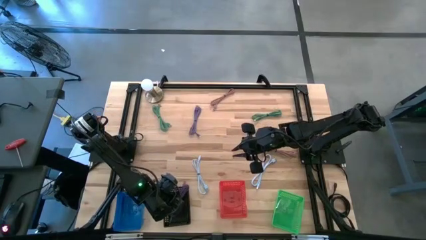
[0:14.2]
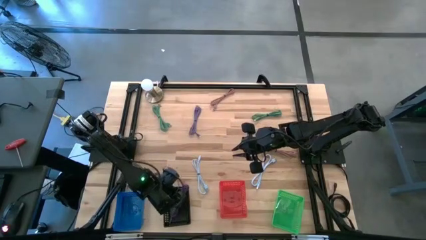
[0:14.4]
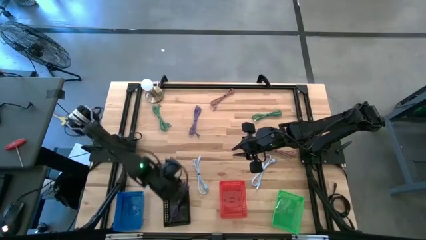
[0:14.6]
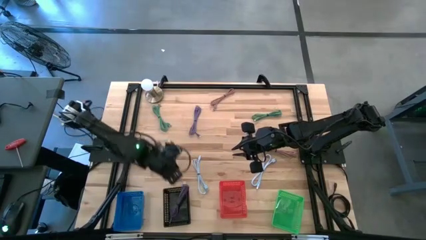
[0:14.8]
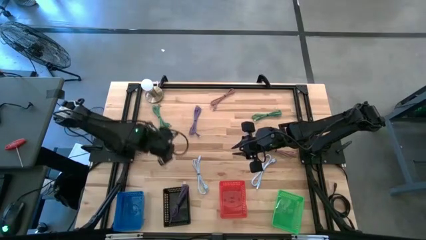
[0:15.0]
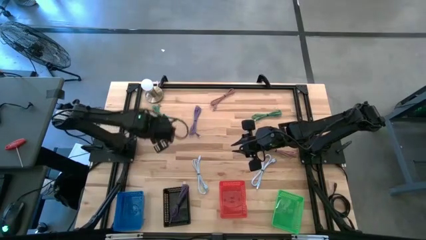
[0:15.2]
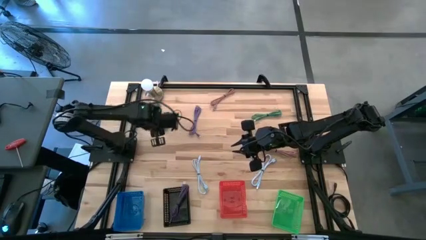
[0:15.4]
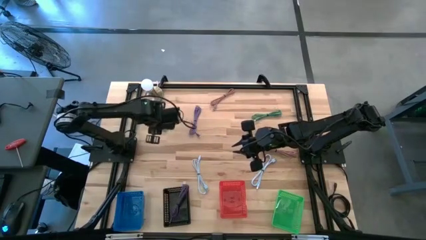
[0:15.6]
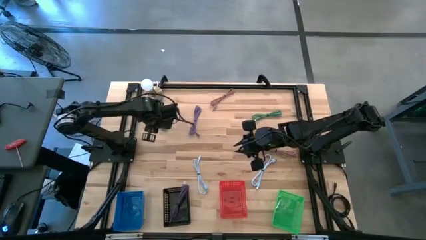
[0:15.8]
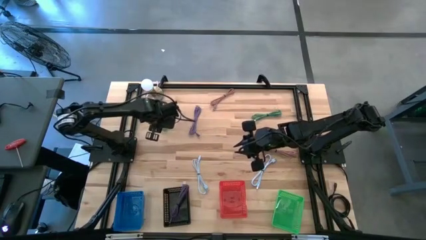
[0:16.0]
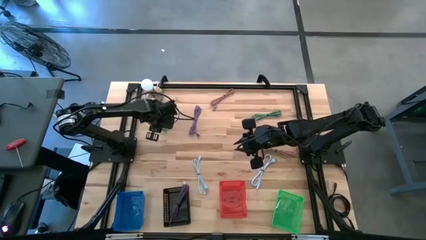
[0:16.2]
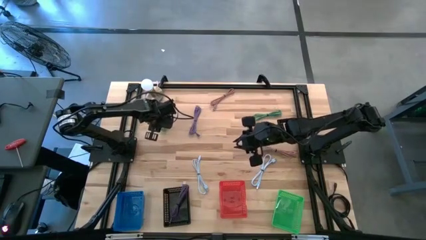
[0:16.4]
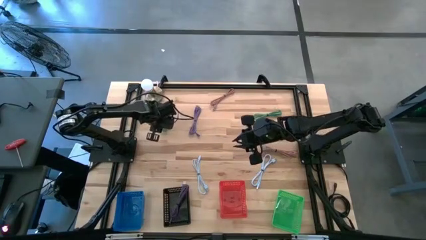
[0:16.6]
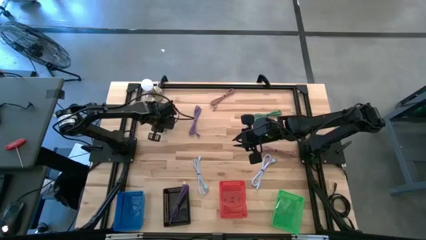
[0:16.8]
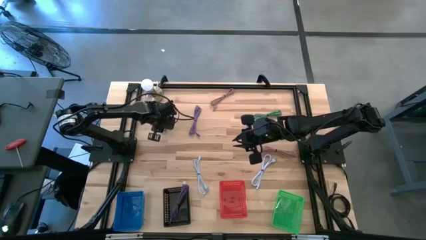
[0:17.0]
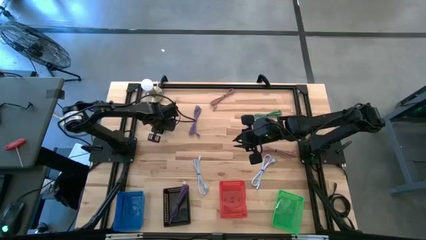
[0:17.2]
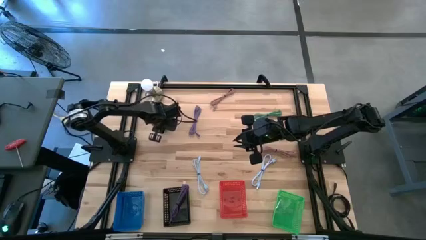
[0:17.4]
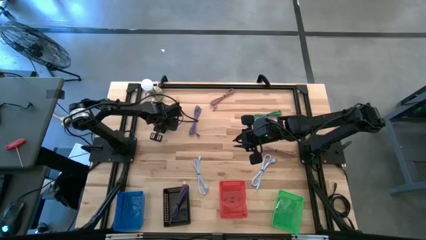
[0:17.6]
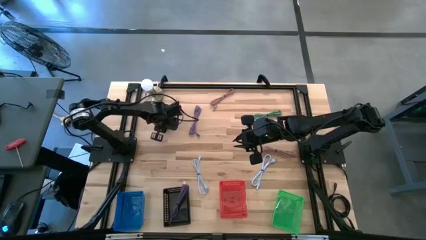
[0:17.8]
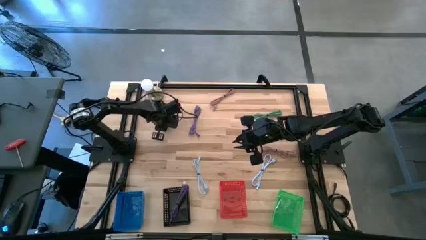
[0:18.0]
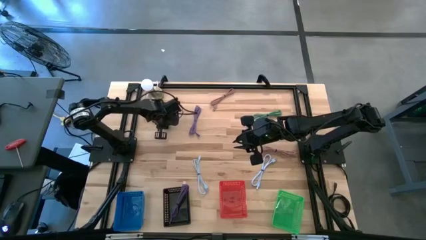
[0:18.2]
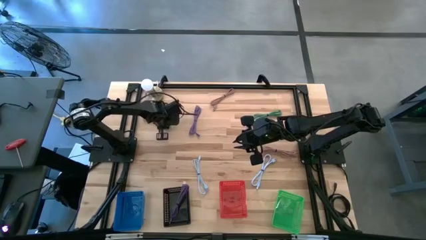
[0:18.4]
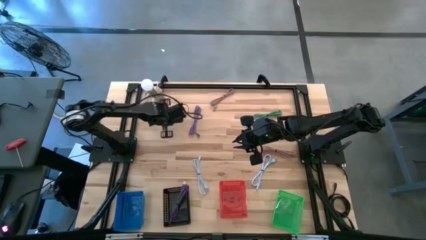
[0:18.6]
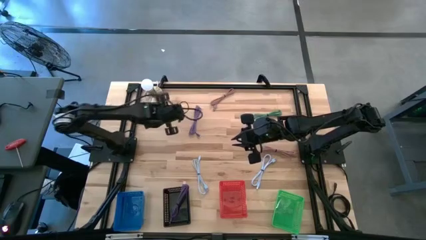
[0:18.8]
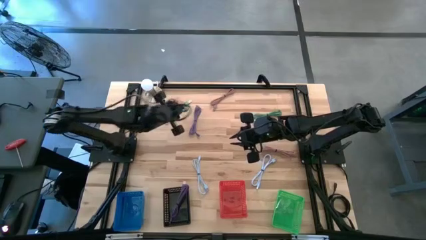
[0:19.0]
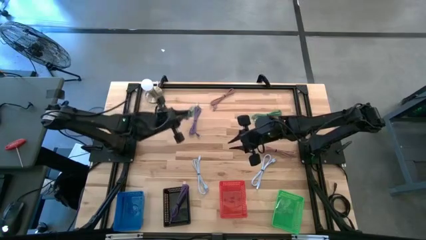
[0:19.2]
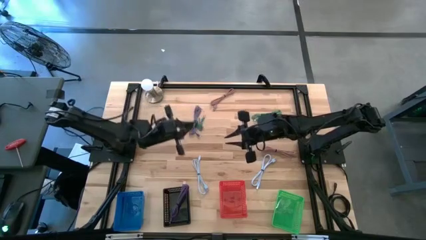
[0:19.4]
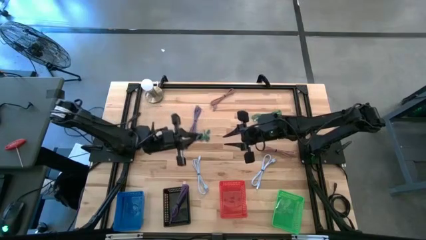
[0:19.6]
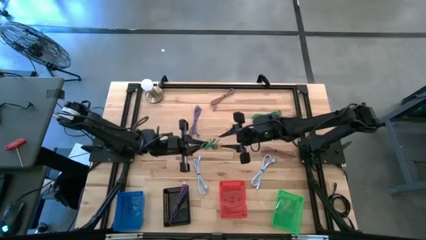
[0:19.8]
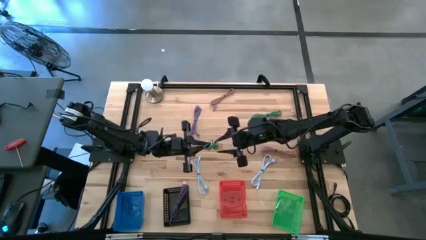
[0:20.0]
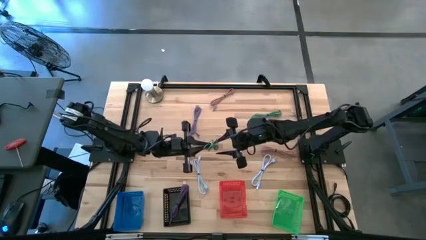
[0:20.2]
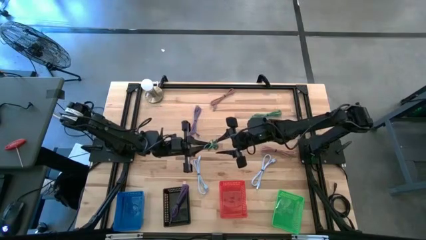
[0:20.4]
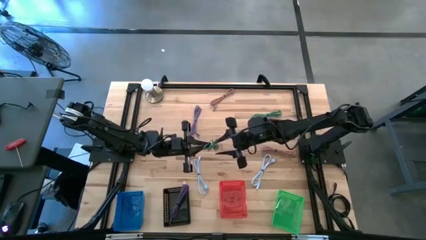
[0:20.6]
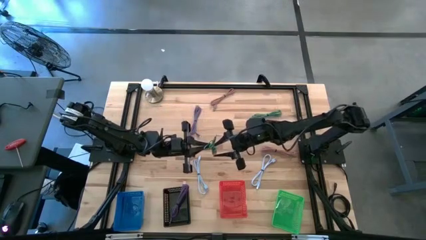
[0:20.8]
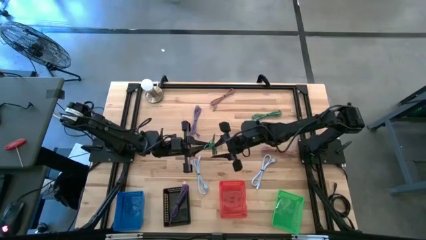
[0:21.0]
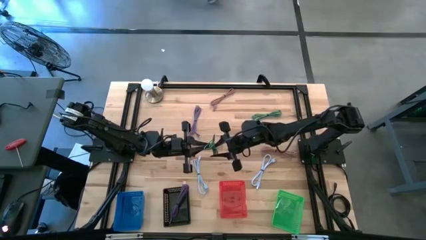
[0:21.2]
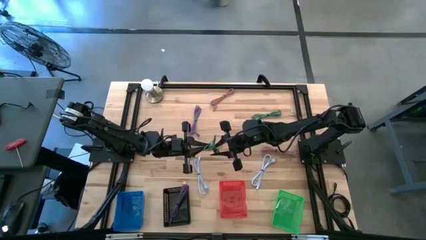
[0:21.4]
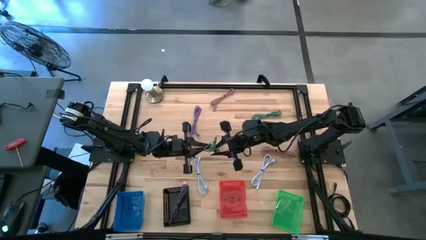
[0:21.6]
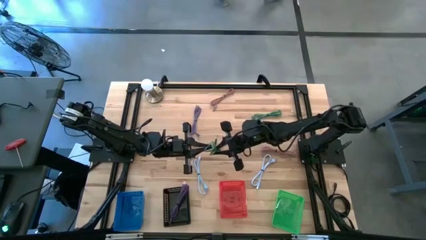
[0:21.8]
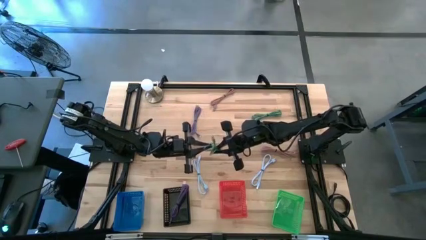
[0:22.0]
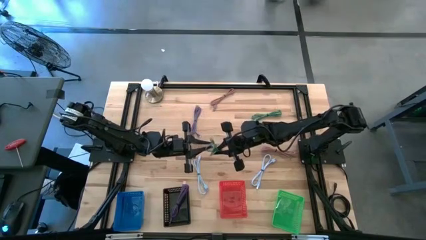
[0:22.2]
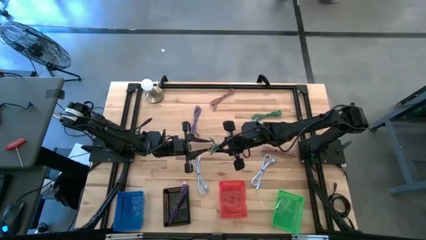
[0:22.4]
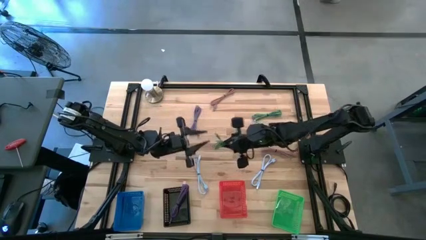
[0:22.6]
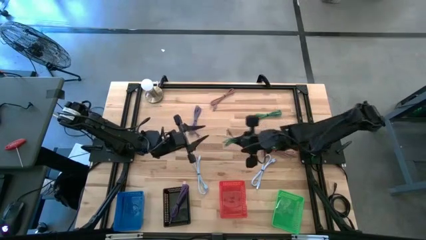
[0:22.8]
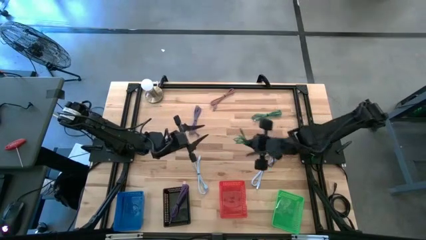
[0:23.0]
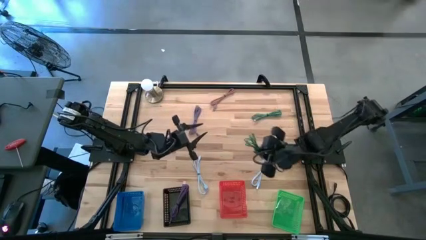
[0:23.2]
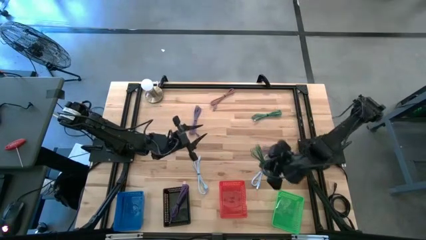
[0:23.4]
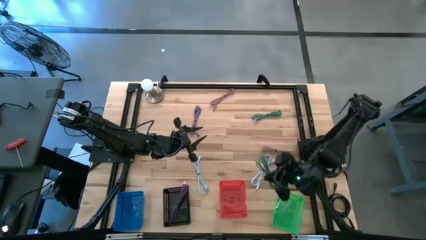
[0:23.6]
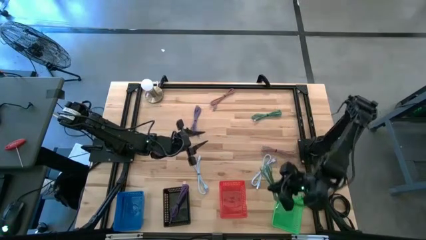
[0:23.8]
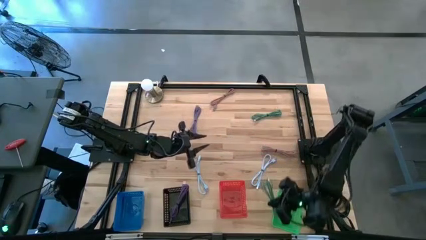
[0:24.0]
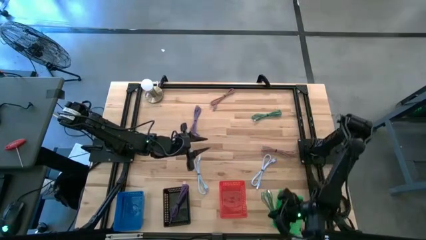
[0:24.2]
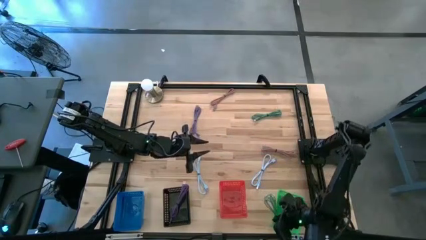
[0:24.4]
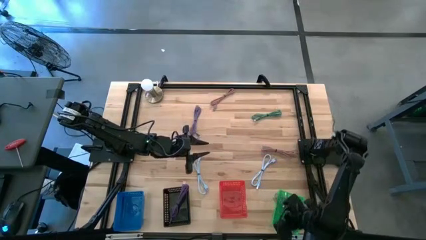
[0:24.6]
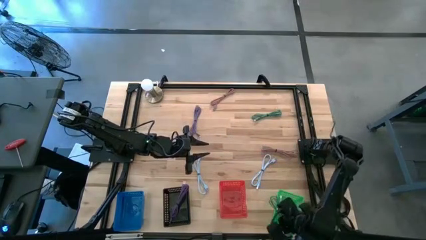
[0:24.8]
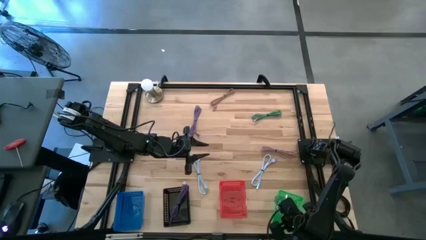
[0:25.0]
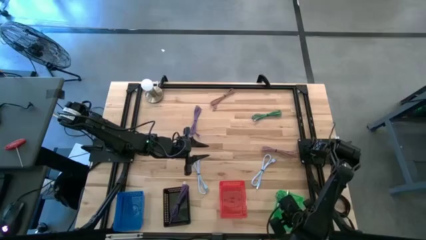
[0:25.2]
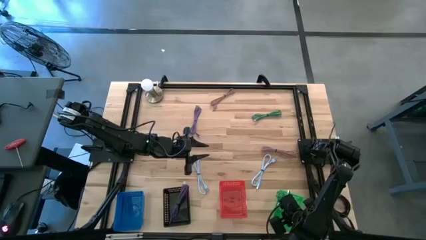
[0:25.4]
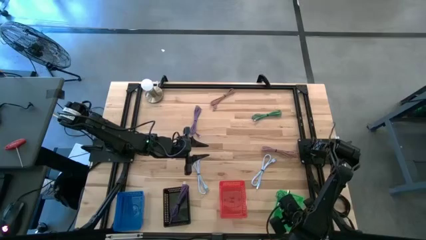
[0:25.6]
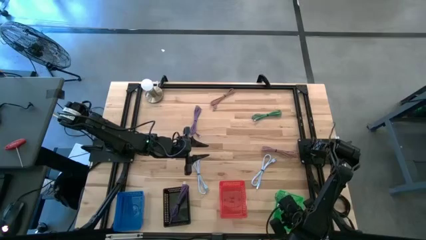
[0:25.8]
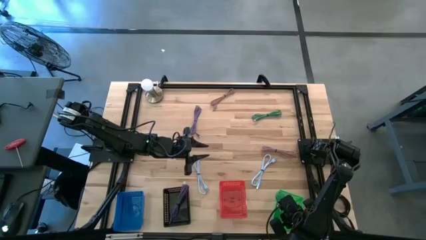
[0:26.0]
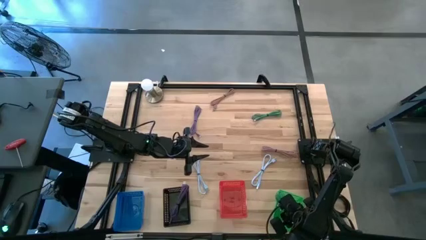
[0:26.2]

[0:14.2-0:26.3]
Task: Pick & Place USB Port
Put the left green charger cable into the green bin

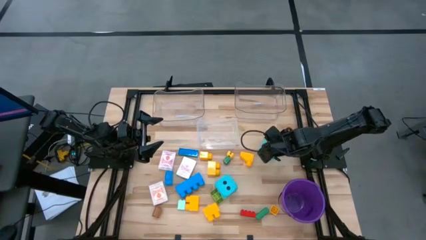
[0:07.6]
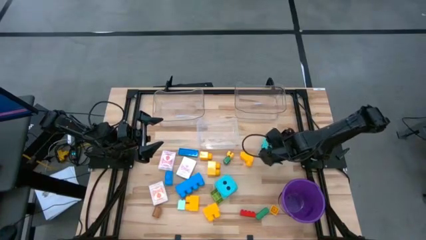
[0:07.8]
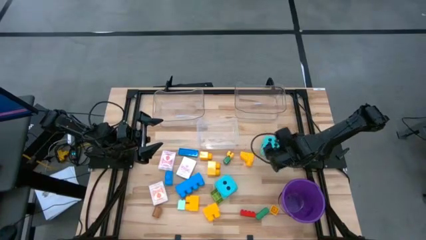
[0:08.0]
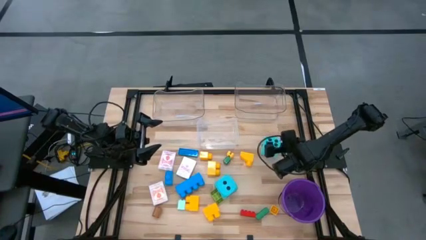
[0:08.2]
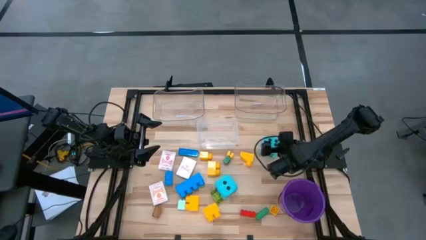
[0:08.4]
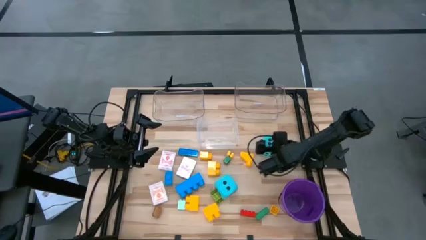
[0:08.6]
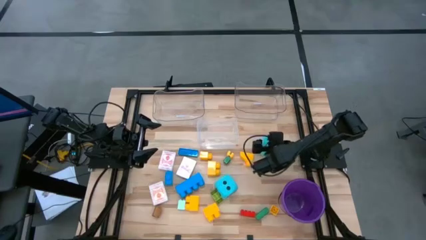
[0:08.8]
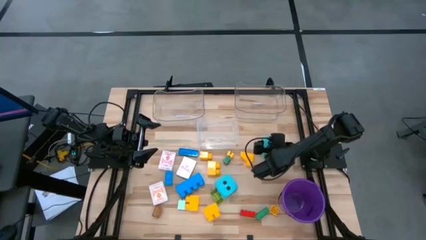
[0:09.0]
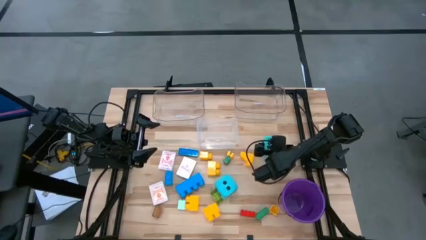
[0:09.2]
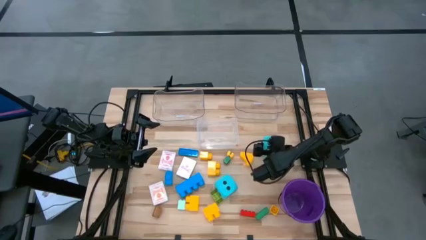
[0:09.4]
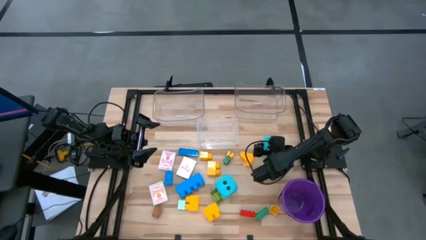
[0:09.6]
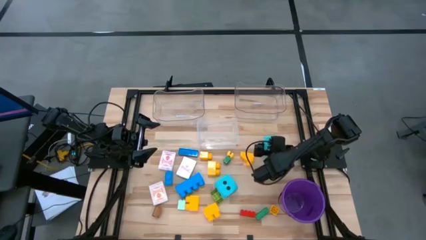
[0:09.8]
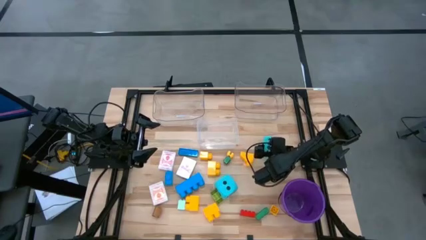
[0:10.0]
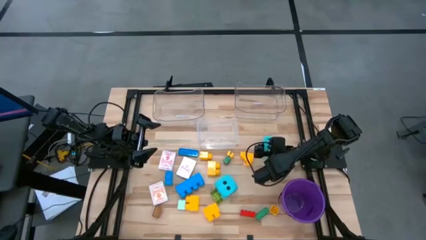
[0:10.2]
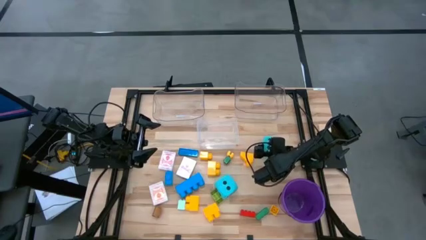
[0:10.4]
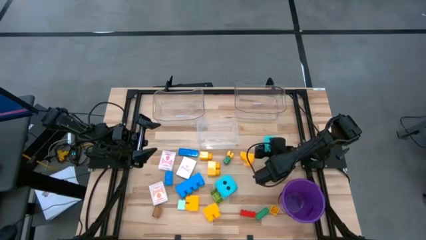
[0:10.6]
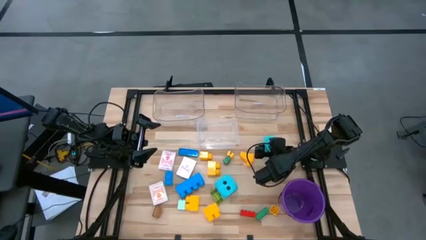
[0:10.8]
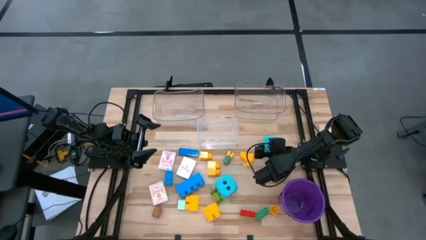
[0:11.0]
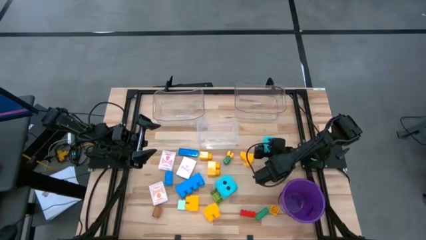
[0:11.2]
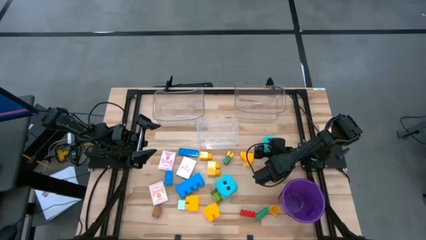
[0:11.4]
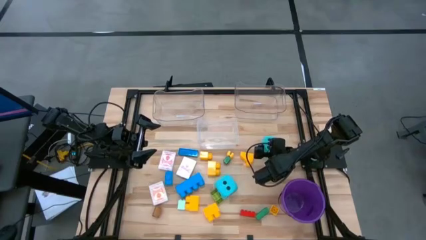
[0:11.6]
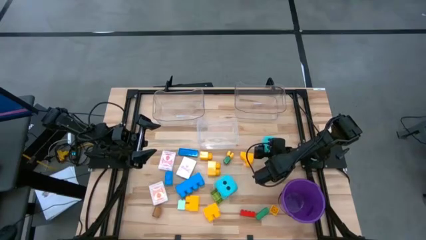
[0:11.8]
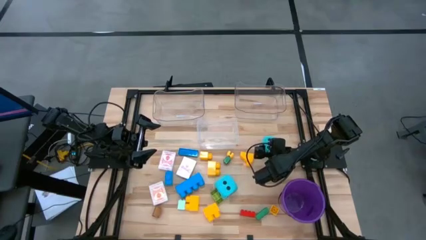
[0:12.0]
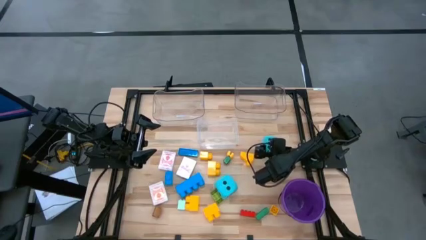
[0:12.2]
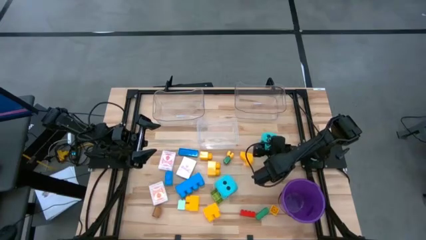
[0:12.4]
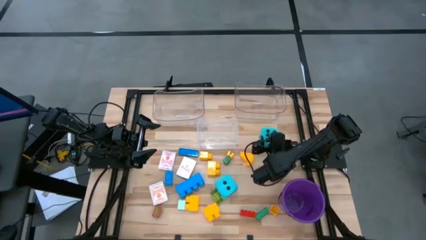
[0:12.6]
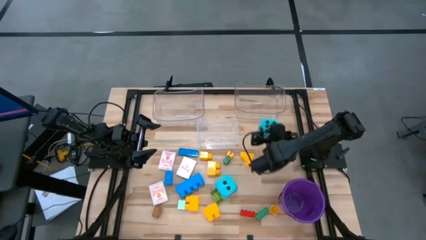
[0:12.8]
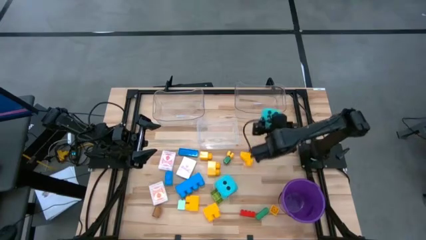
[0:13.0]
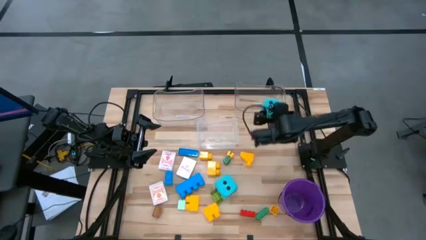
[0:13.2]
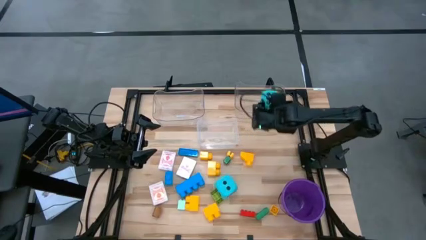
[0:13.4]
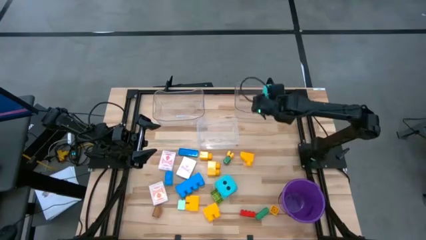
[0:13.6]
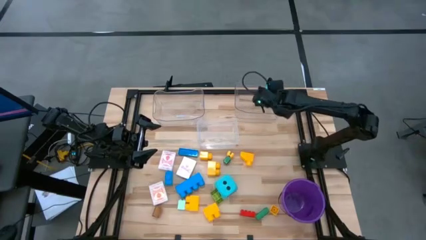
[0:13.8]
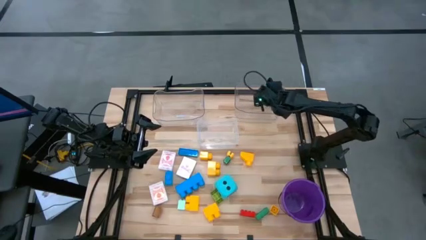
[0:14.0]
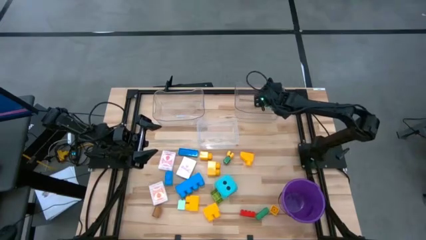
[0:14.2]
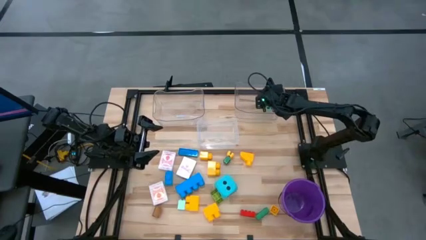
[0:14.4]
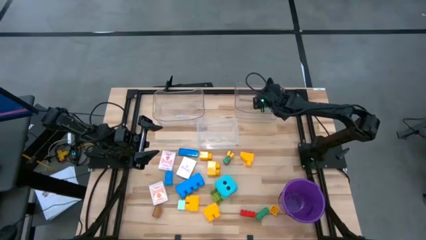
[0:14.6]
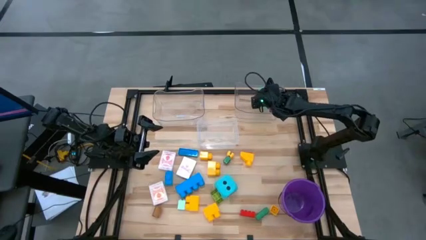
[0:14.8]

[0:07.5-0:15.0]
Task: Pick & Place Toys
Put the blue dice into the top right transparent bin
